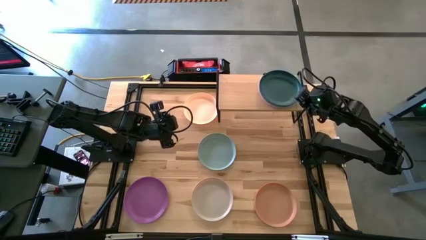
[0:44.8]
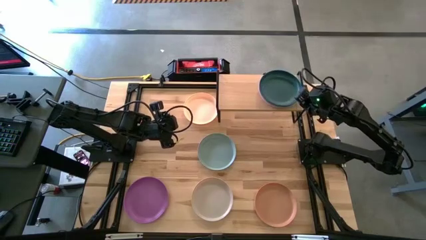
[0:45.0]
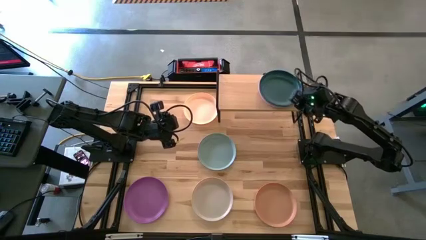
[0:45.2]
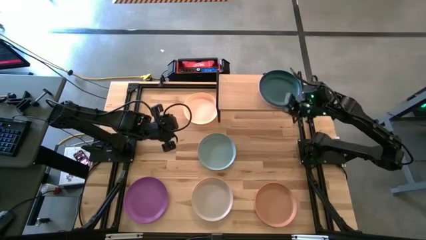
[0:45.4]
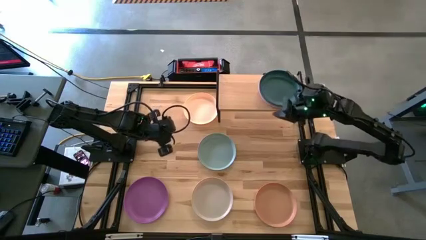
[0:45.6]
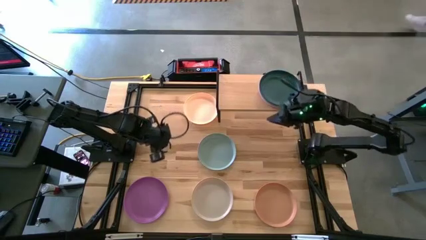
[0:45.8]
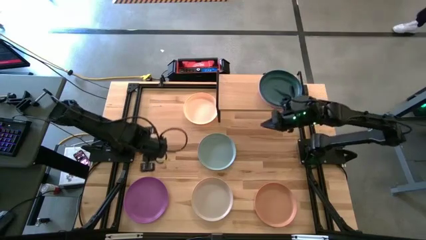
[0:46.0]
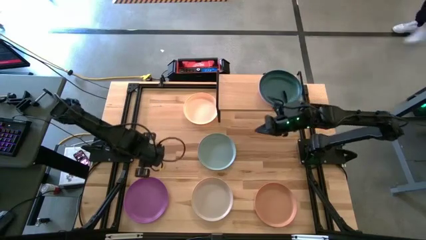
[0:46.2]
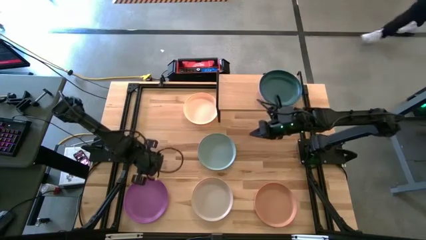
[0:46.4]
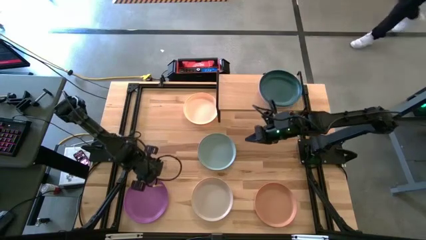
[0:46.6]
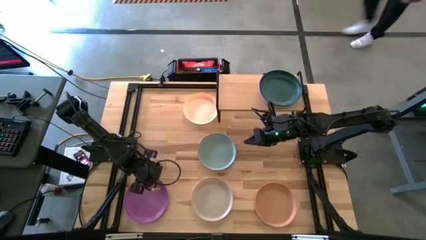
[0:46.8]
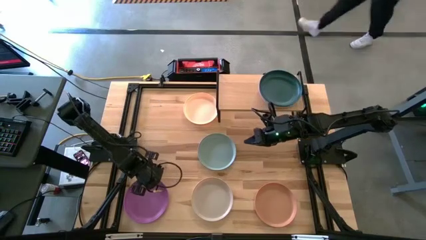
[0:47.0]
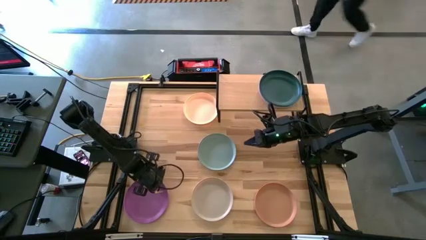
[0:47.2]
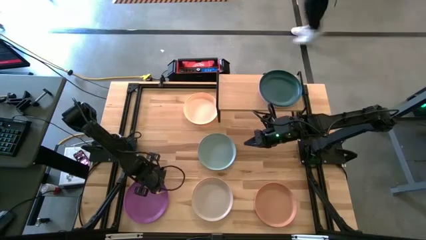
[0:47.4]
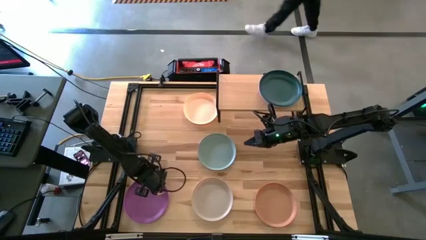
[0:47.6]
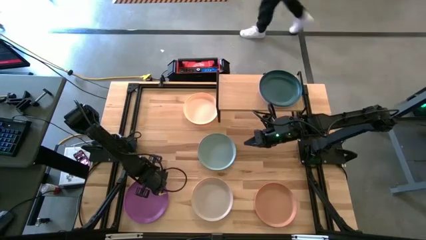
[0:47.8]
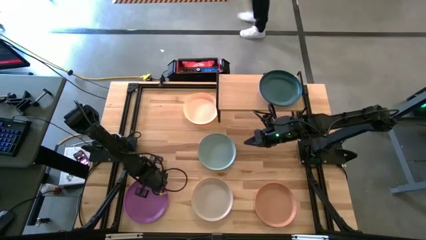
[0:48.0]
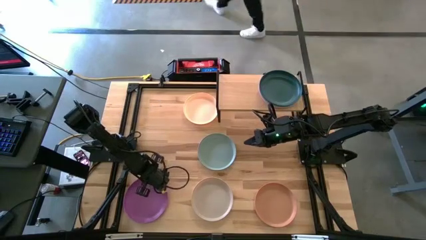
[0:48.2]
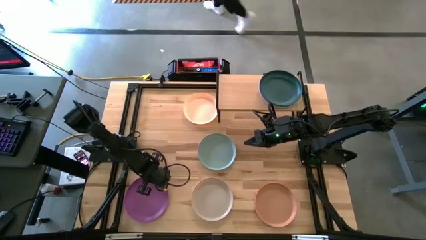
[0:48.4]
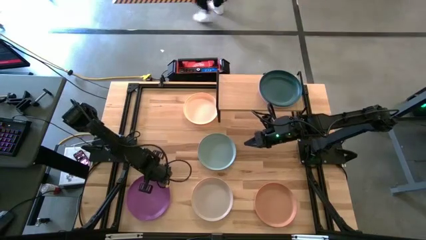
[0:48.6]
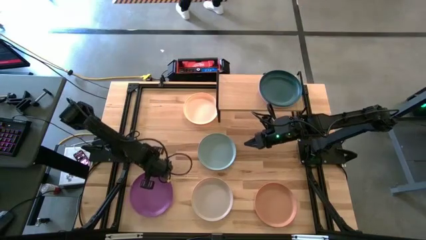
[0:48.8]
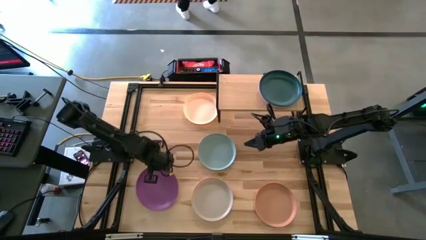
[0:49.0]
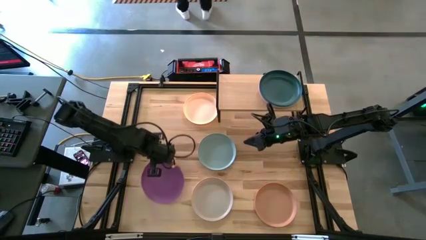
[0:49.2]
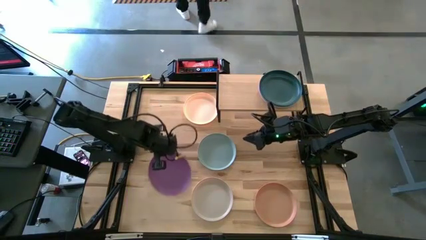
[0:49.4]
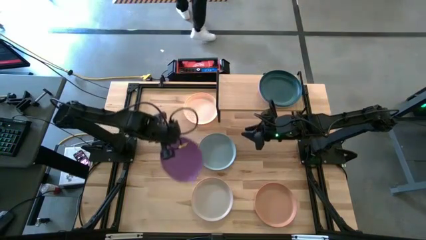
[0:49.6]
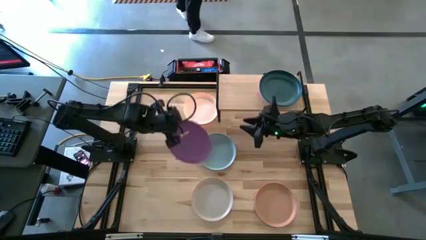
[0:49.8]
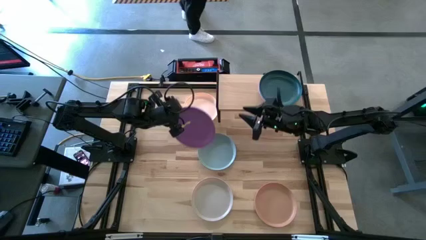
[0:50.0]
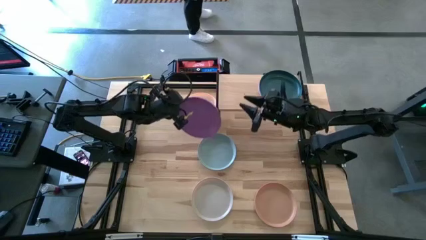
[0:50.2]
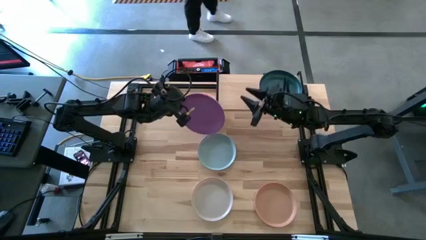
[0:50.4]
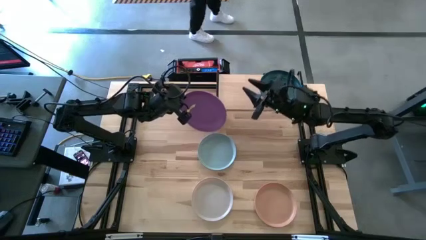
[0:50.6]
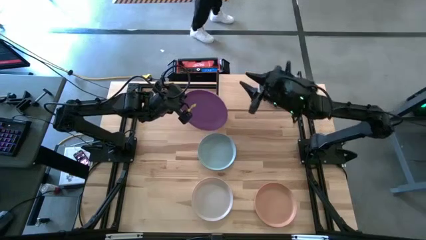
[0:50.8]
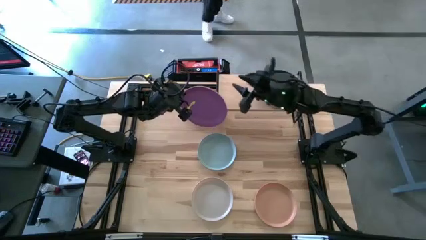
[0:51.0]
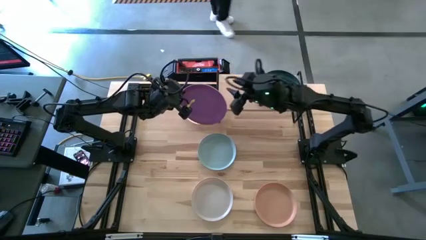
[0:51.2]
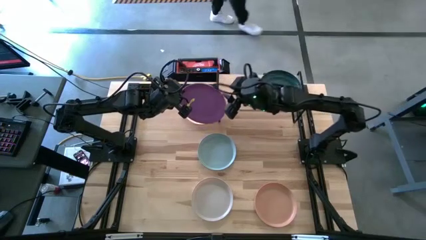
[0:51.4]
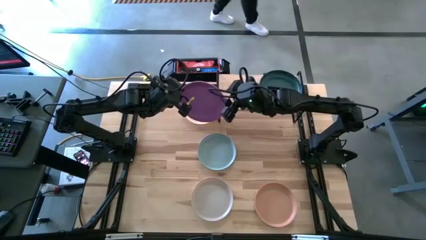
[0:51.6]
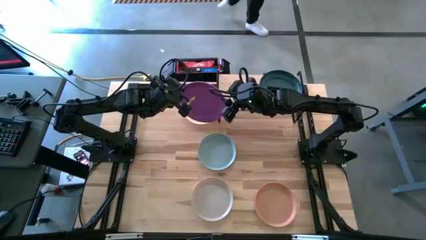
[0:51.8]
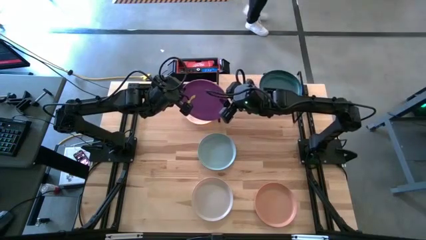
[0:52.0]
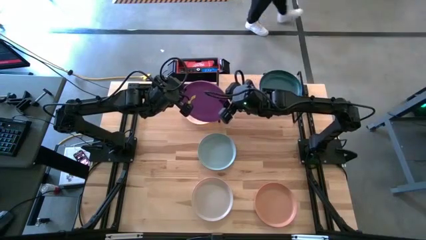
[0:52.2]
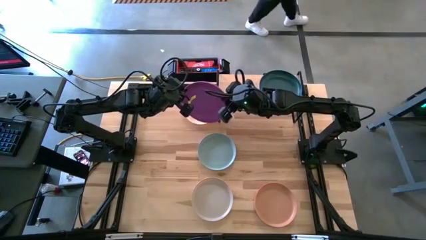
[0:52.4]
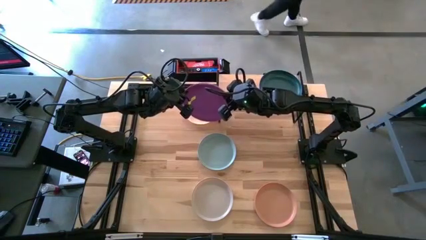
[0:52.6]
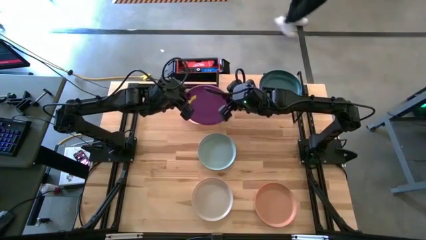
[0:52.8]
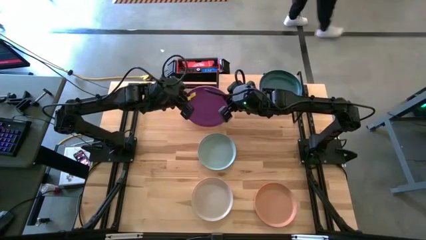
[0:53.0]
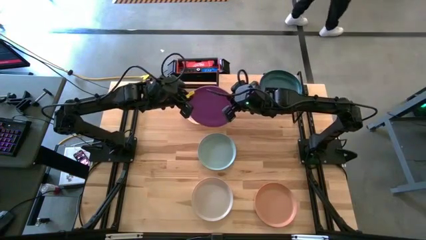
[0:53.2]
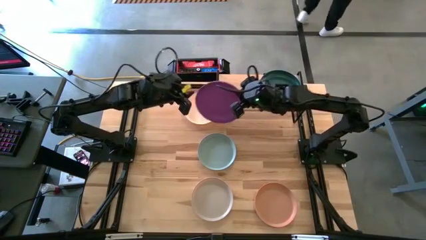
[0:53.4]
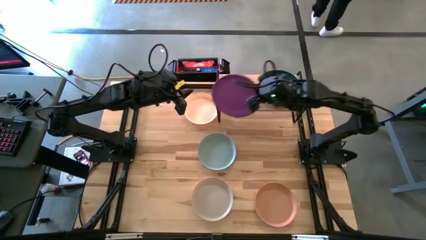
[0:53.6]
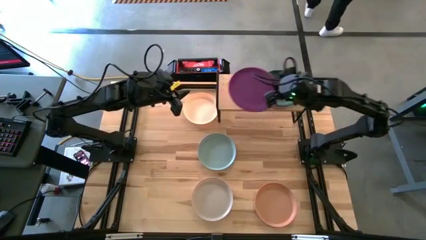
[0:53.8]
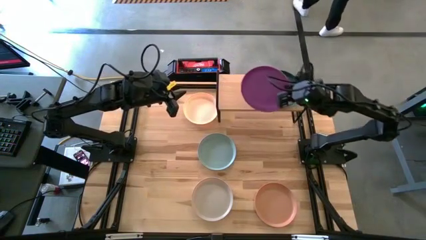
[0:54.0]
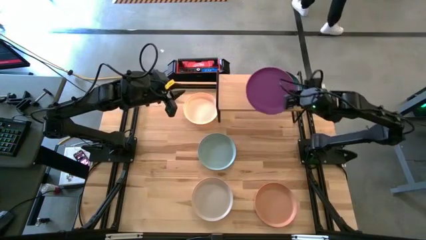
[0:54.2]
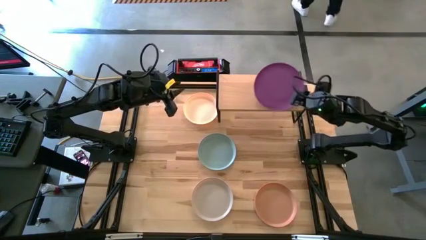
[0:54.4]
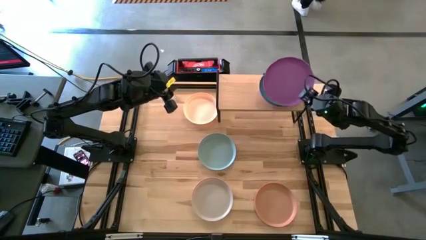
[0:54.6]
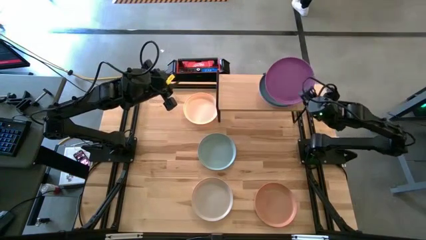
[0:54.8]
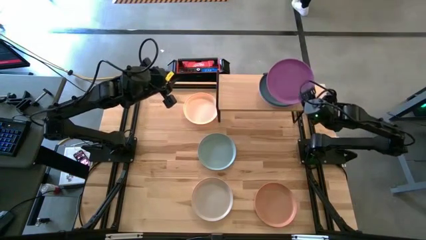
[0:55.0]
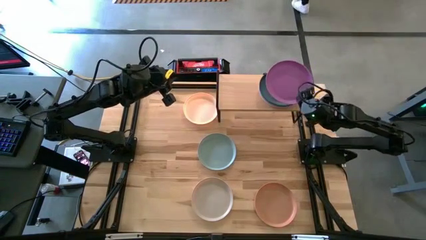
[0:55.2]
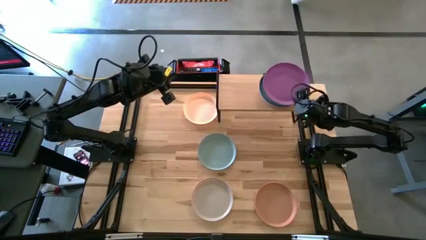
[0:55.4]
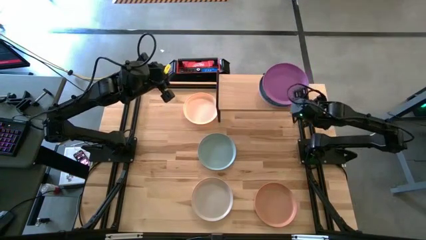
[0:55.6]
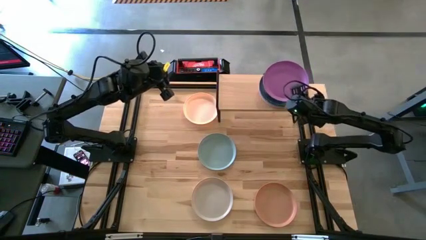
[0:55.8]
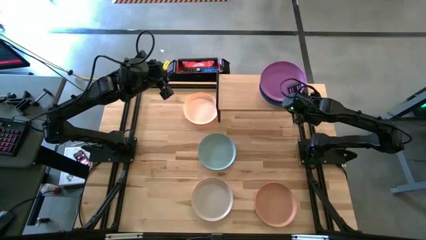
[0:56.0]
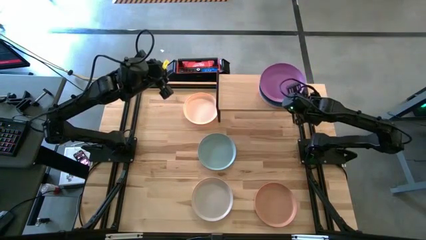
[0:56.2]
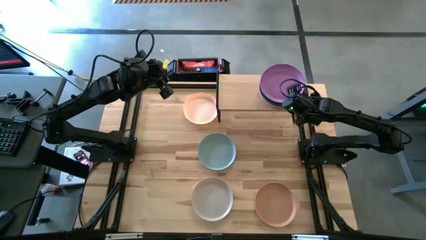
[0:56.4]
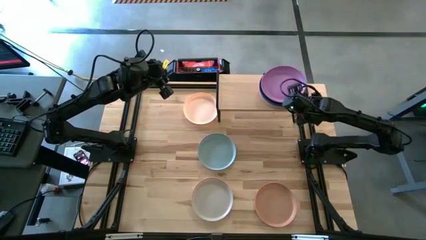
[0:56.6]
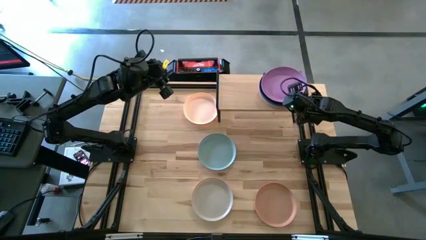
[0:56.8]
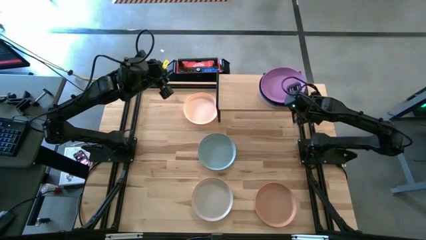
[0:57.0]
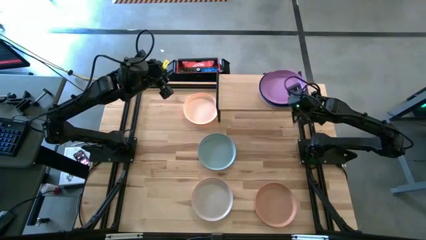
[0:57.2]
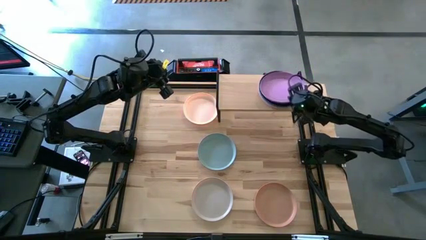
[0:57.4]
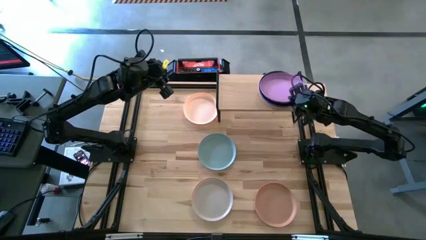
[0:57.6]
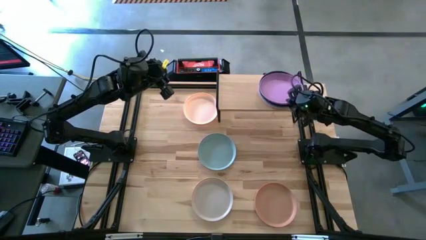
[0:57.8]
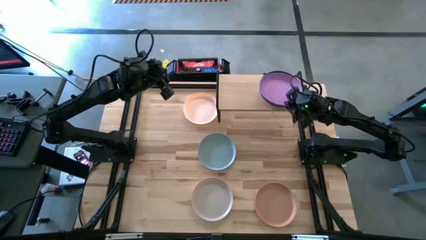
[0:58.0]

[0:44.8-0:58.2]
Task: Place and stack plates onto a shelf
Stack the violet plate on top of the green plate on the shelf

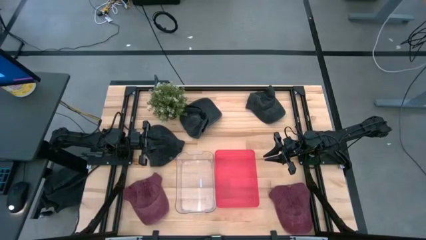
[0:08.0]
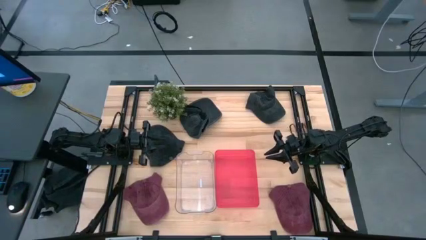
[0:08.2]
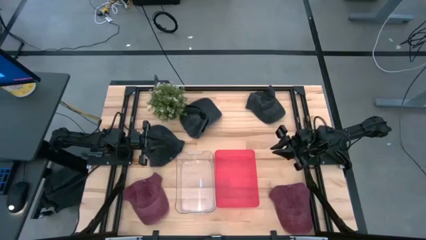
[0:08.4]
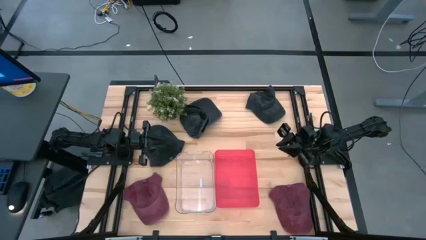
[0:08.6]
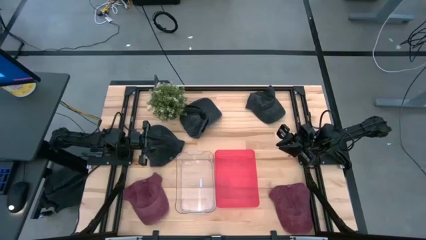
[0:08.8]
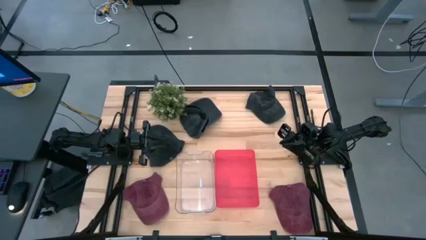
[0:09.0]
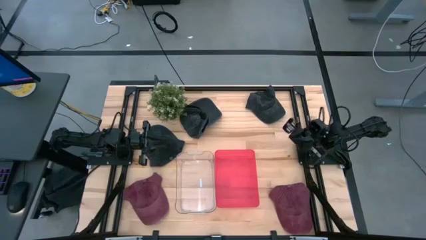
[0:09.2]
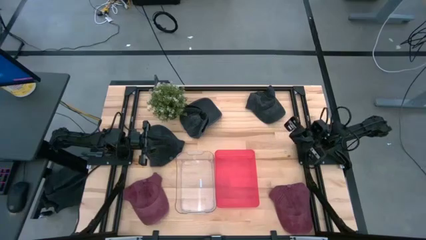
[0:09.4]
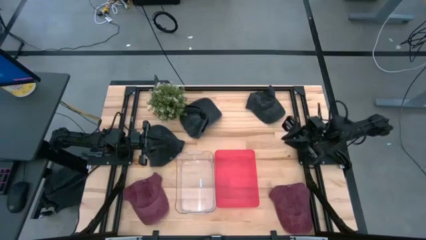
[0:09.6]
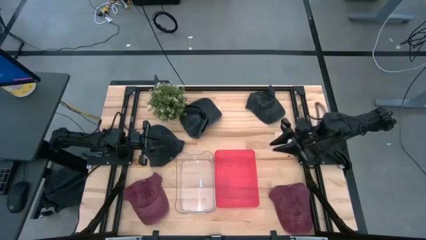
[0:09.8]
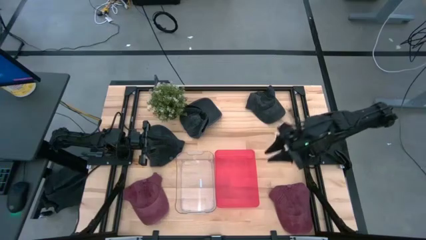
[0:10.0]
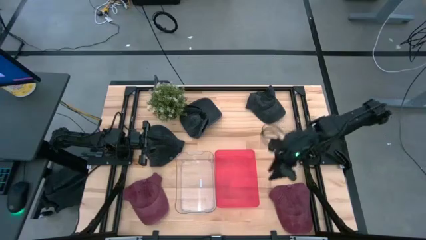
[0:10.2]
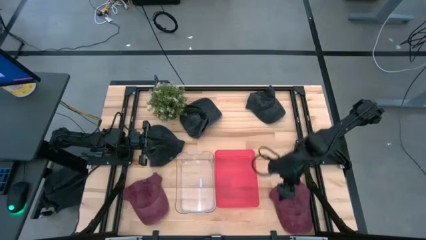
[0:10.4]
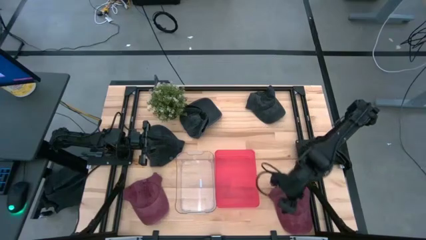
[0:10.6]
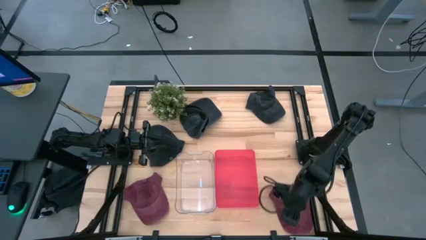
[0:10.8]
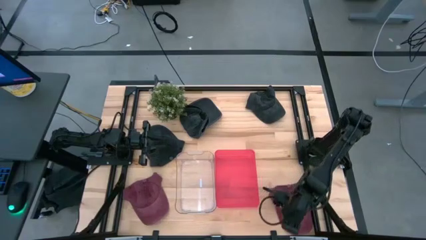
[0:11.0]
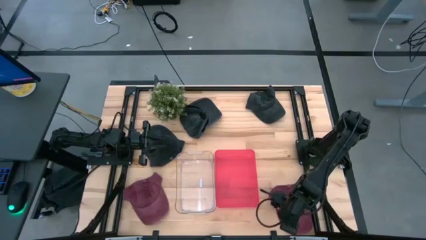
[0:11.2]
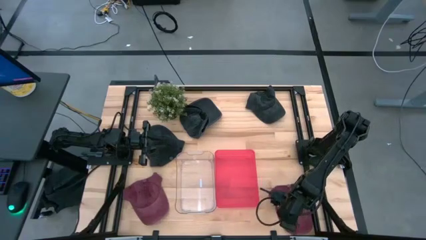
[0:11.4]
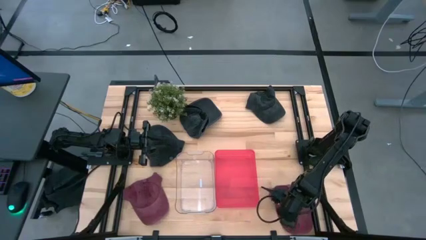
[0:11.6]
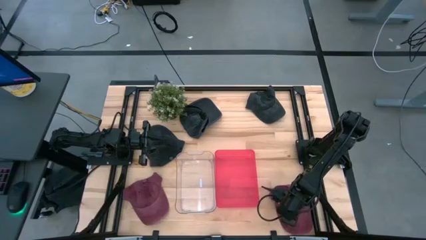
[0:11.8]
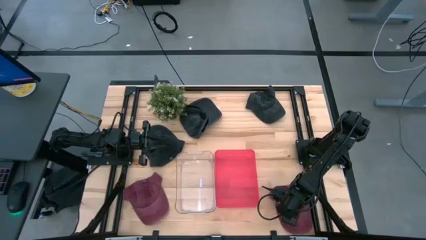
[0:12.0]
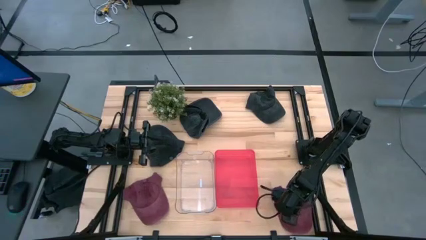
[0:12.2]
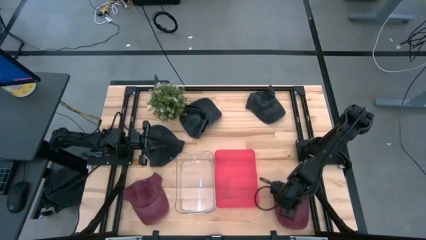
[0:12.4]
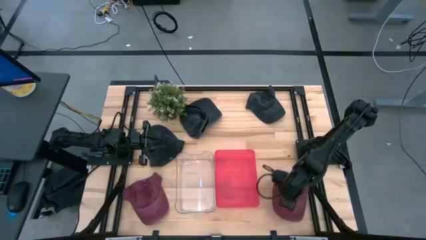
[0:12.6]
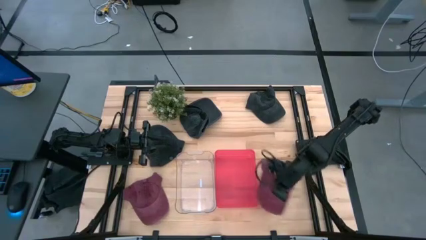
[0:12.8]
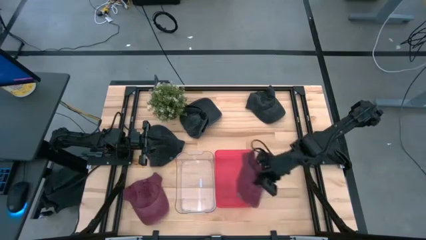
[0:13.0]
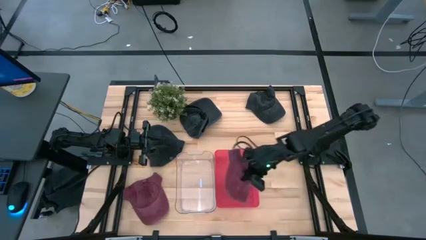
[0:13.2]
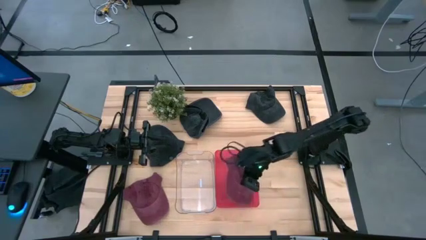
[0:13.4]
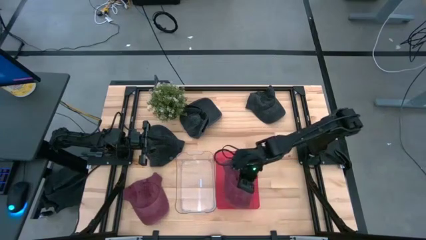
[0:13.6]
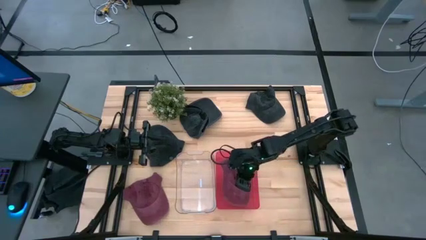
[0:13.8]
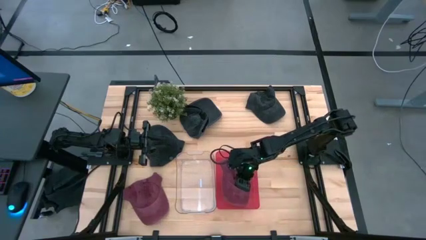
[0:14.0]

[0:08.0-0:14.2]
Task: Pick & Place hat
Put the right red cap into the red bin
